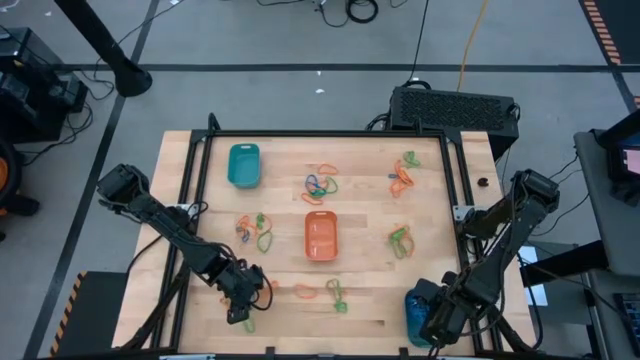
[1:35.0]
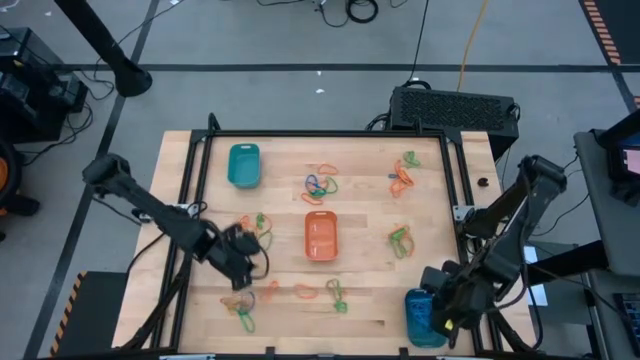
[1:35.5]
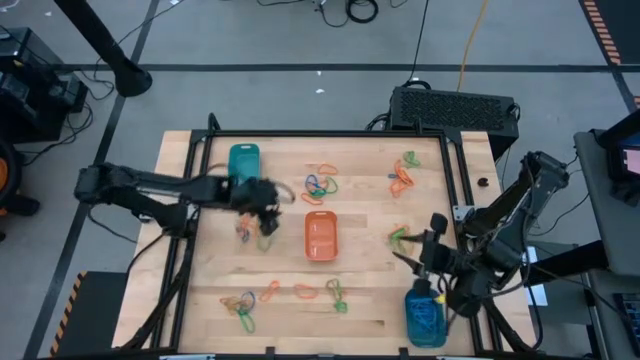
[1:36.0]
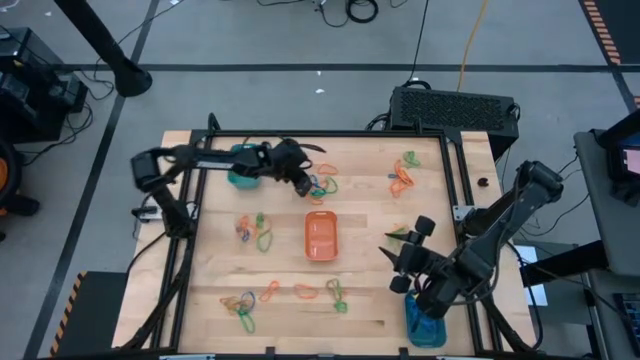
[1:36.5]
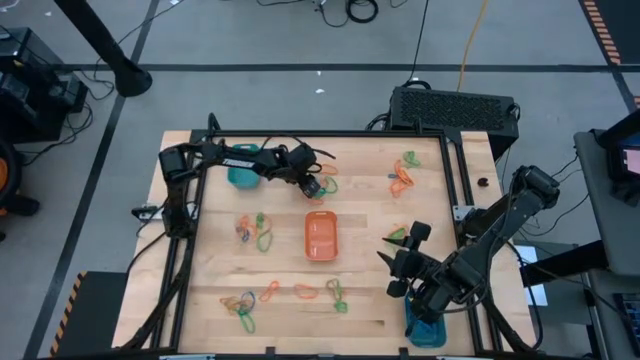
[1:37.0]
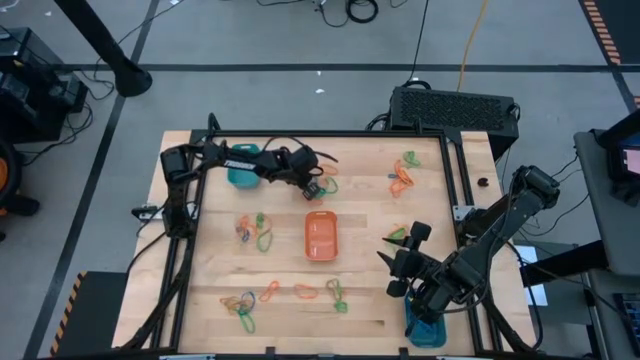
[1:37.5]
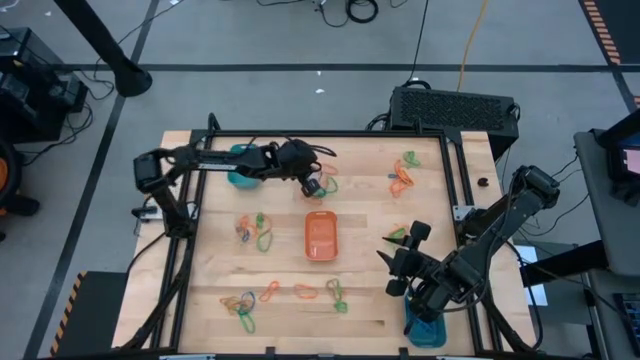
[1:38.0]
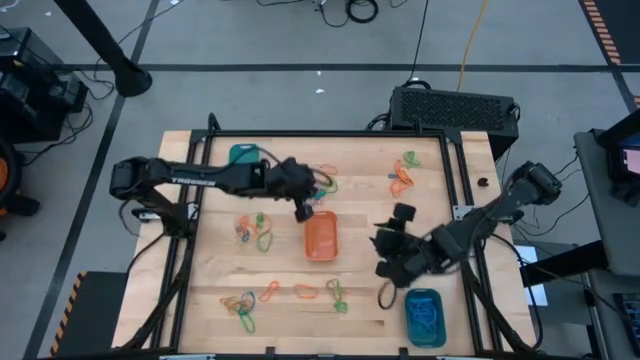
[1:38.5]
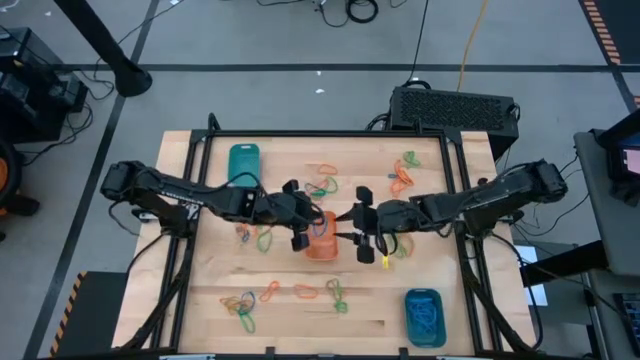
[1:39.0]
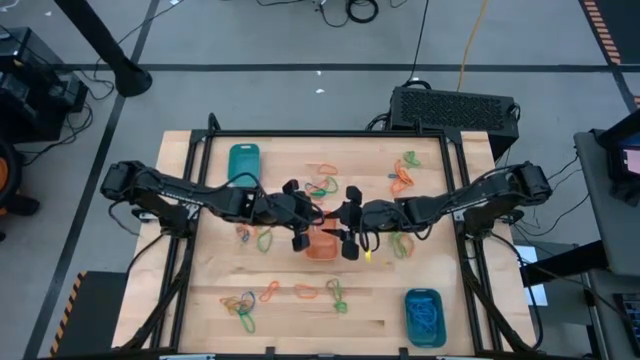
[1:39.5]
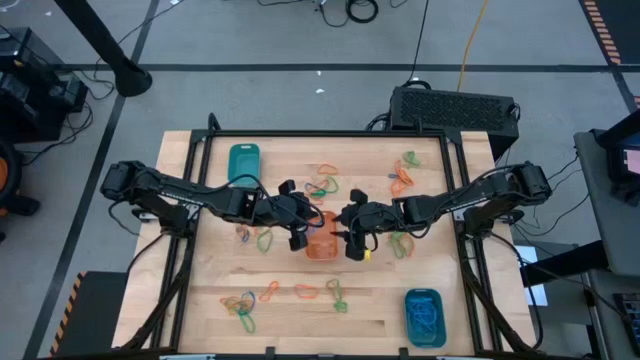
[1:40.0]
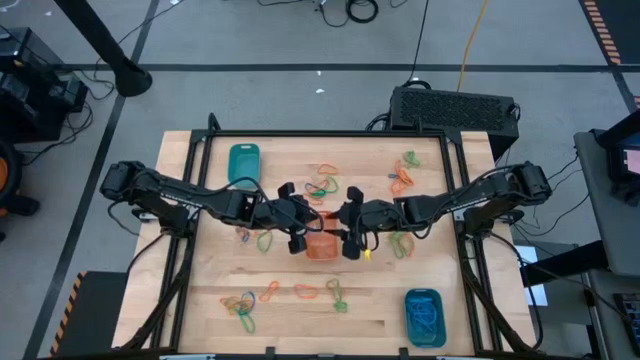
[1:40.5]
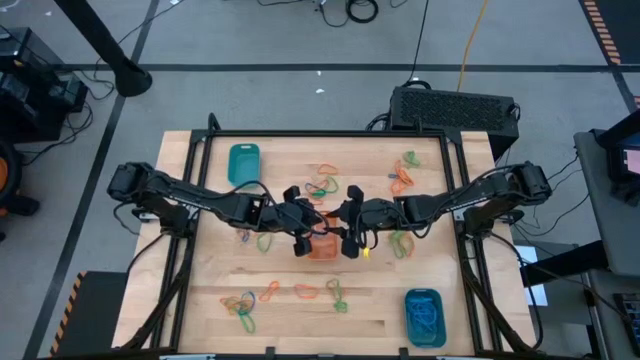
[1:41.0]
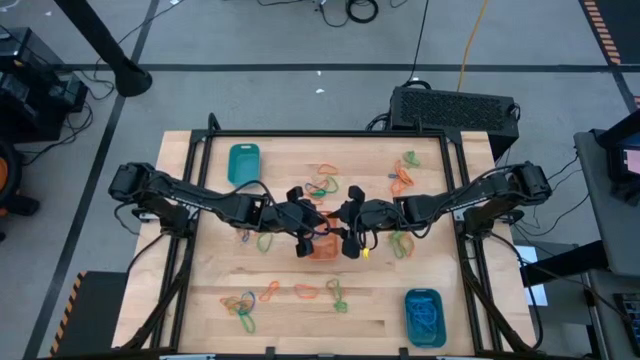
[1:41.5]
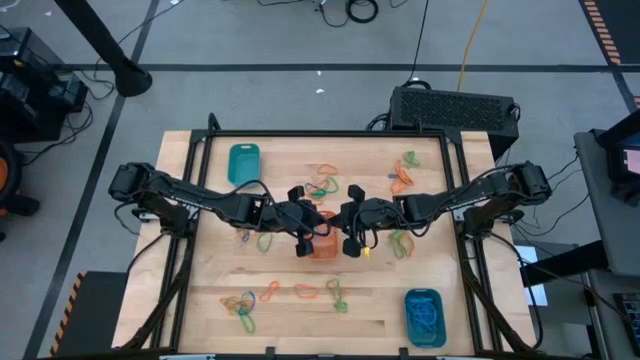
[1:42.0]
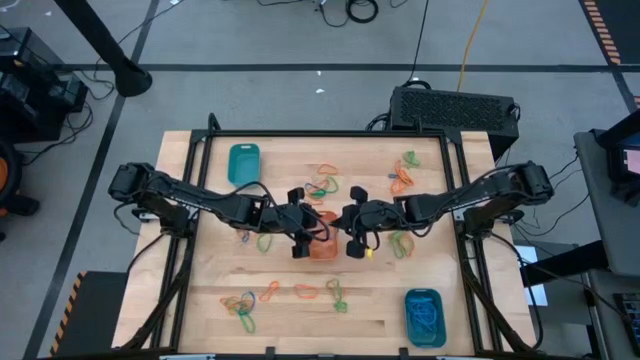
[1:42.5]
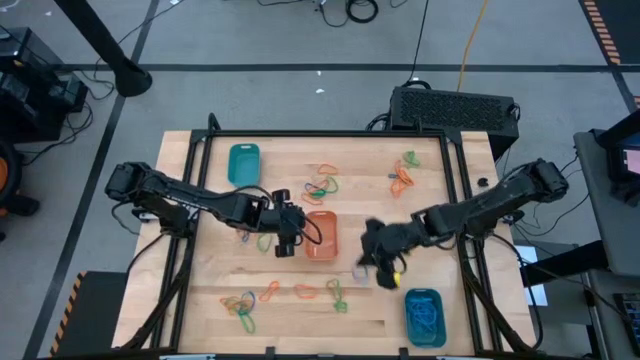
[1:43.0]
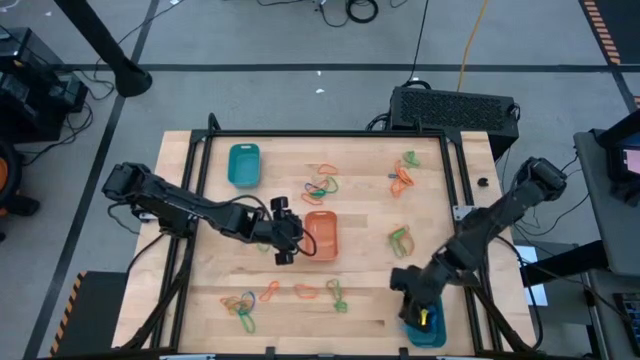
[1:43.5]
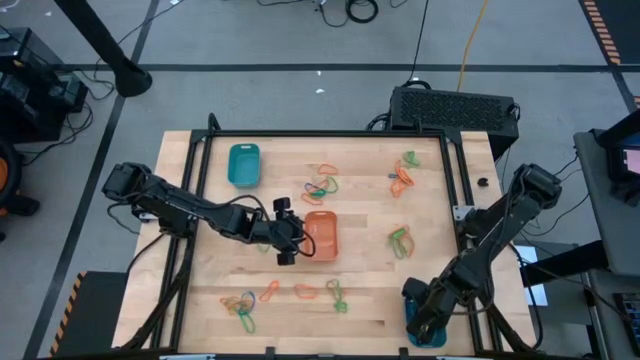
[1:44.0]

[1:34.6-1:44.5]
Task: Sort rubber bands into baskets
Put the blue rubber band into the blue bin

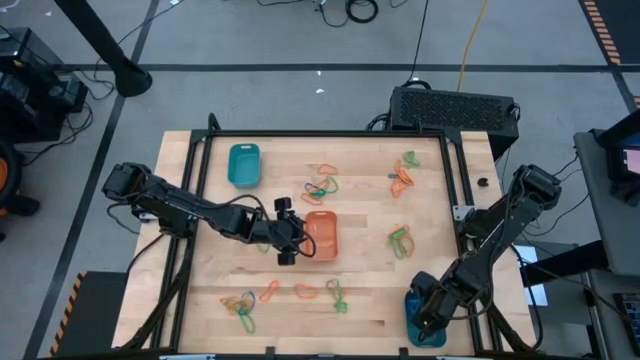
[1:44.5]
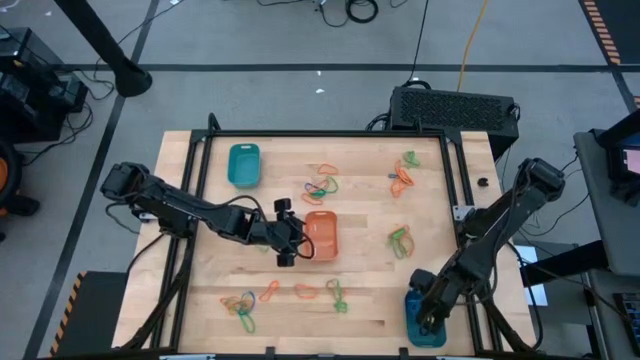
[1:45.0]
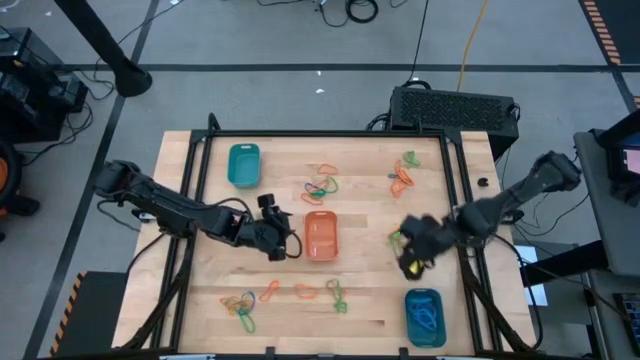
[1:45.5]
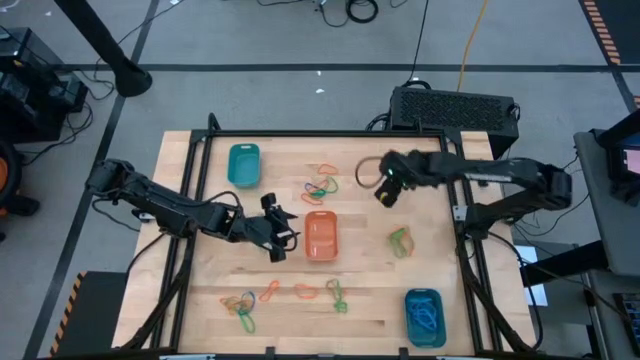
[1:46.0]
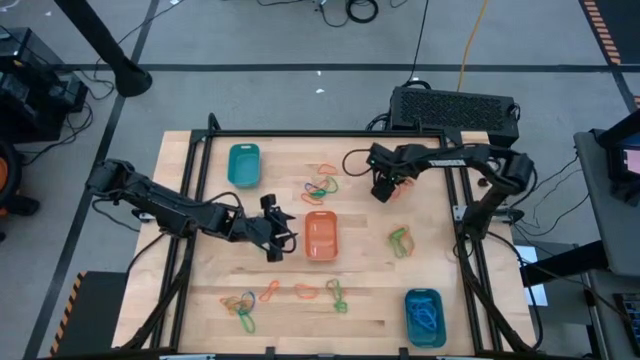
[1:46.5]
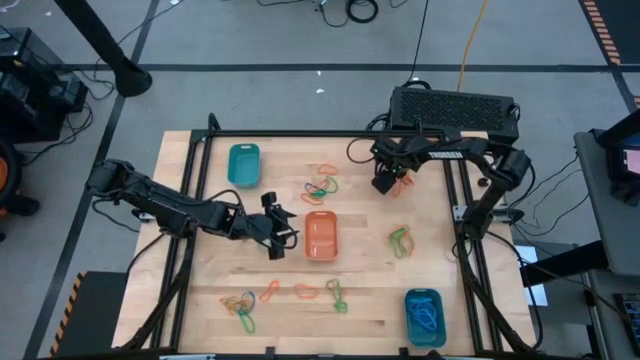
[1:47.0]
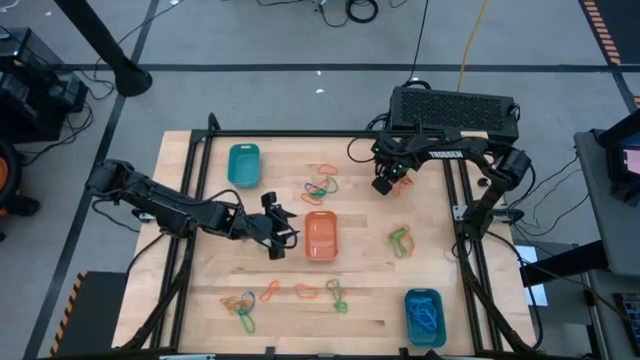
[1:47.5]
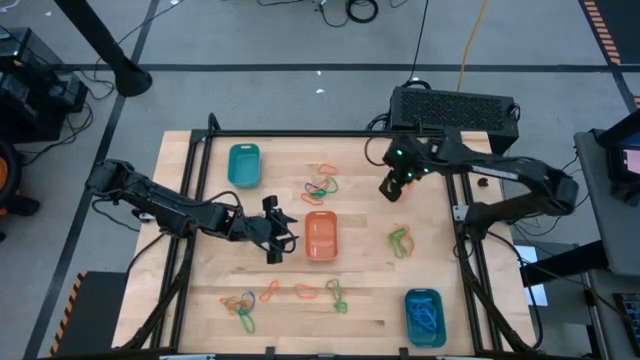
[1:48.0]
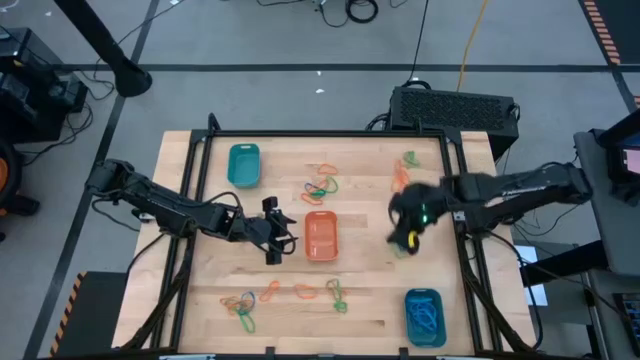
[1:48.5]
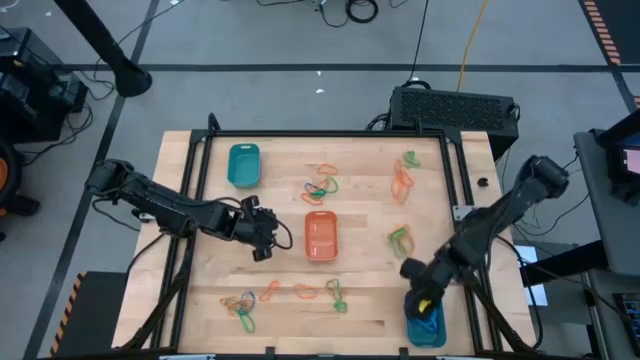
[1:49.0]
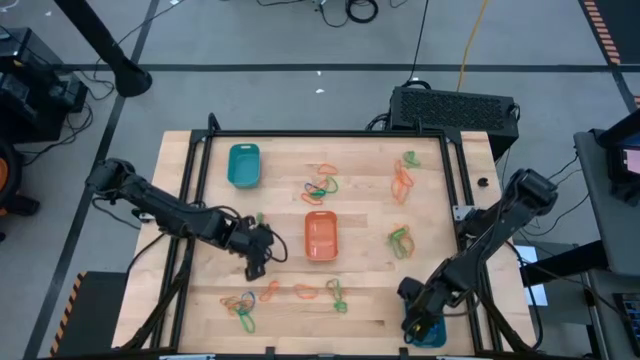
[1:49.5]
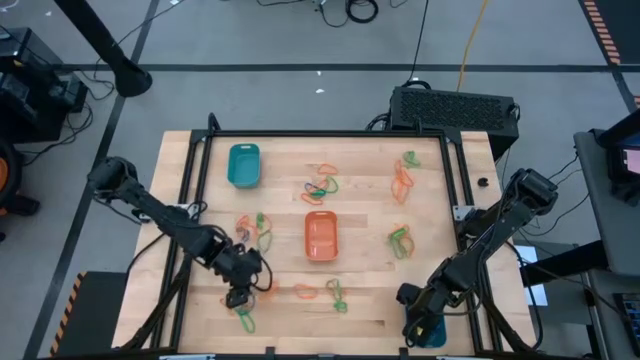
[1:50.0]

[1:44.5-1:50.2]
Put the blue rubber band into the blue bin

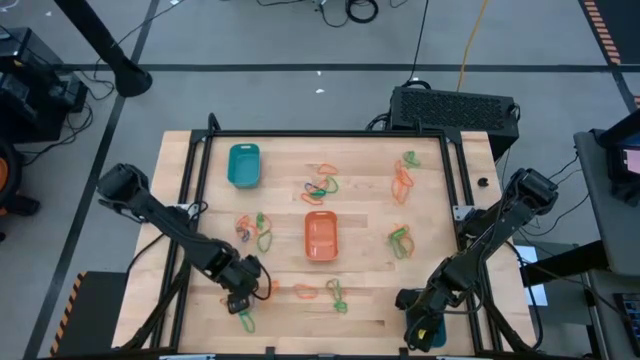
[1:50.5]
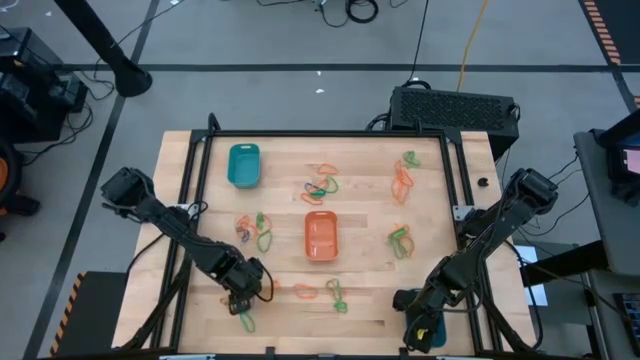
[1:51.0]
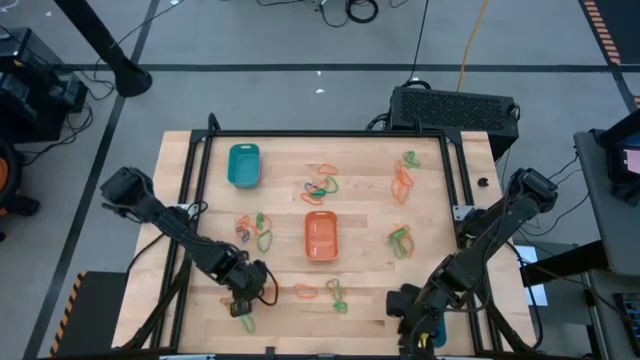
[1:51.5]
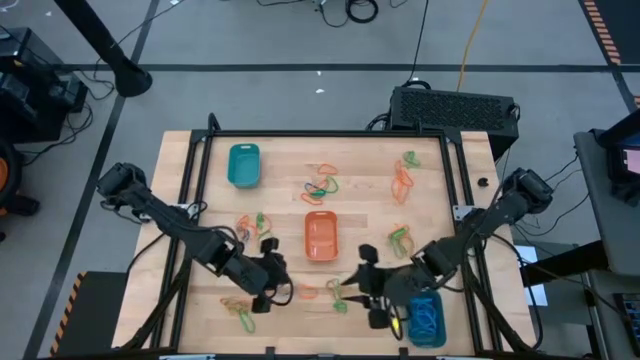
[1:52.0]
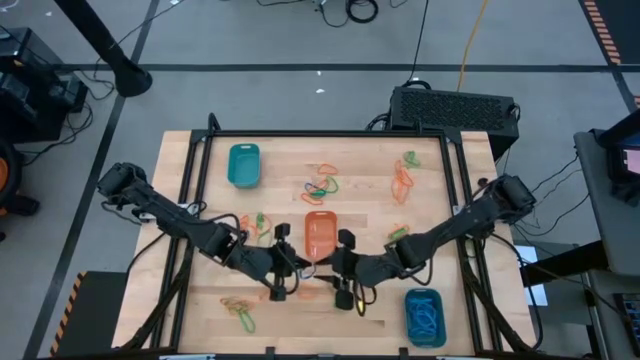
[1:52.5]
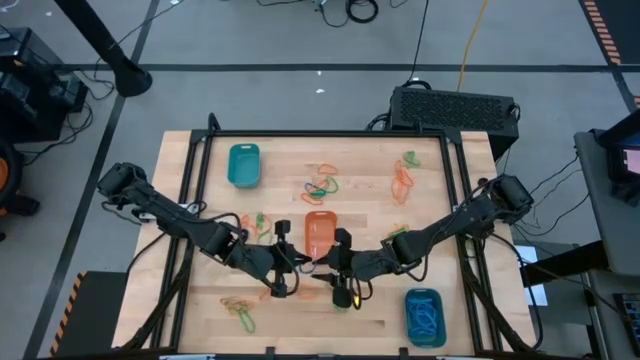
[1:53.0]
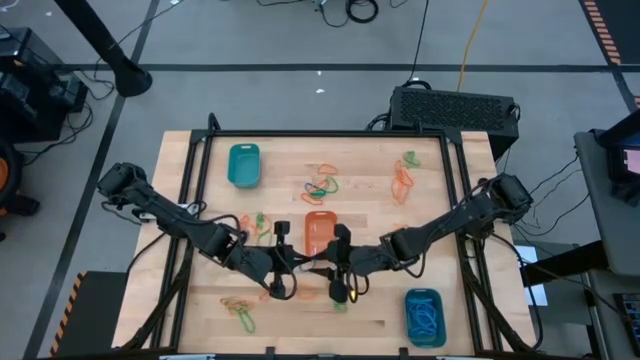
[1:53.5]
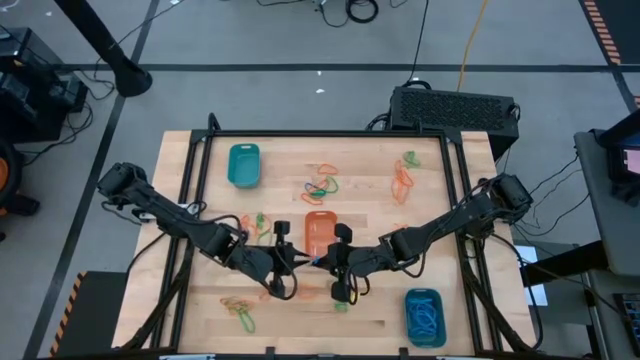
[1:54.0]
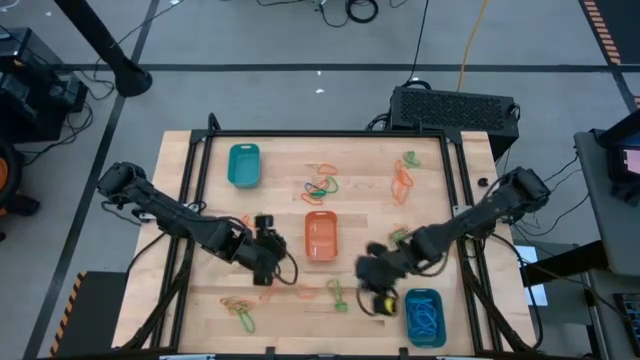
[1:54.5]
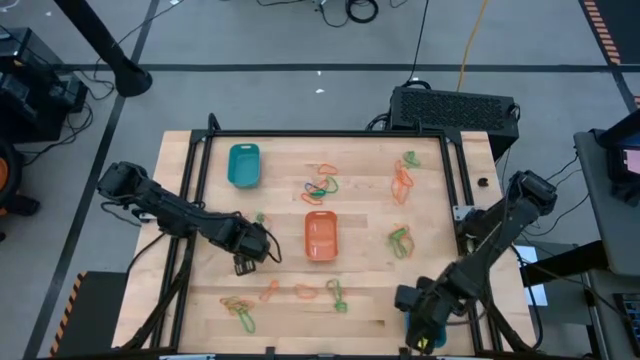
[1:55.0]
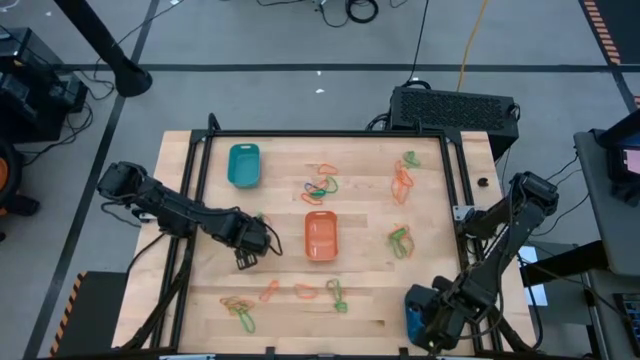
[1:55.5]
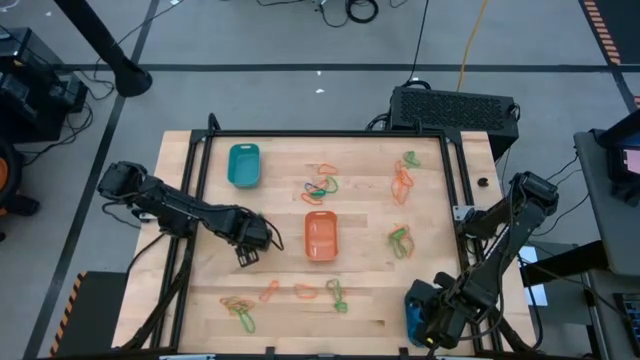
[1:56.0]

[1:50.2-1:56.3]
Put the blue rubber band into the blue bin

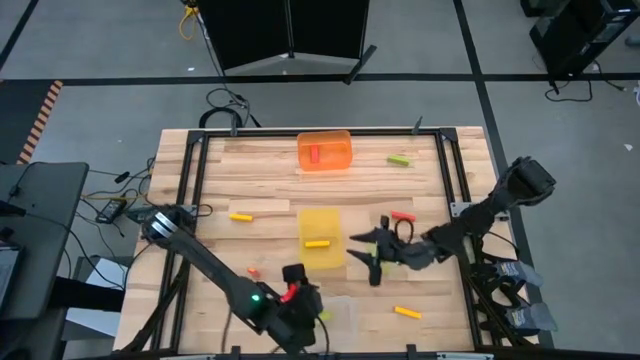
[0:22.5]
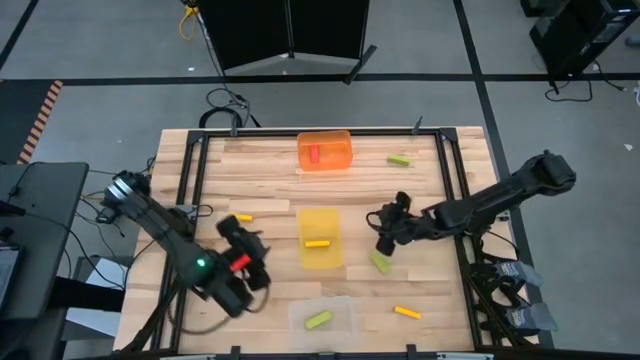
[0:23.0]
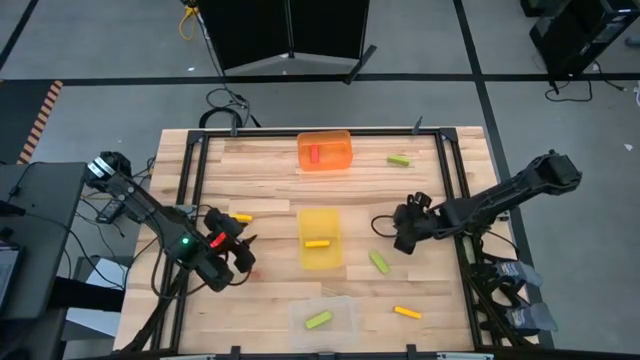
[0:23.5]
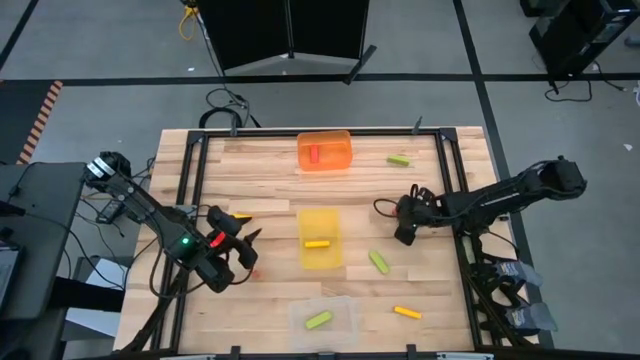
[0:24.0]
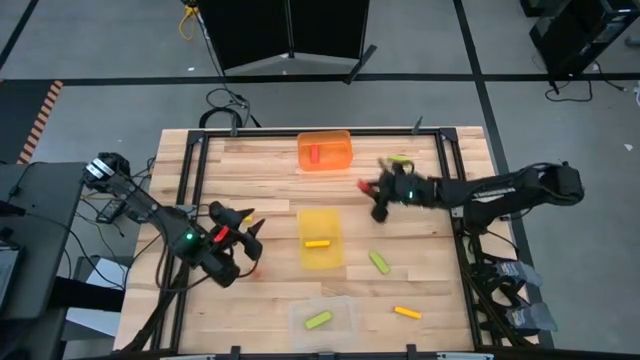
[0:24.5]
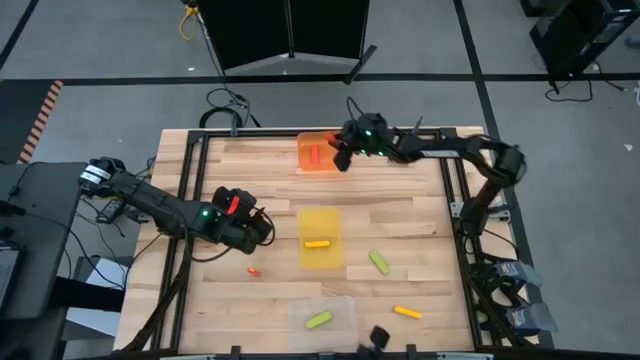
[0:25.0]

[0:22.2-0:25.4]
Task: Sort blocks
Put the top orange block into the orange bin
